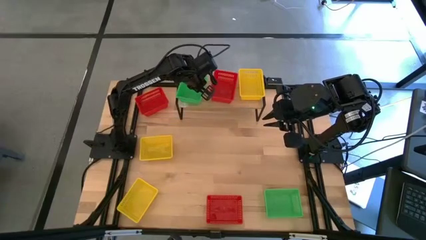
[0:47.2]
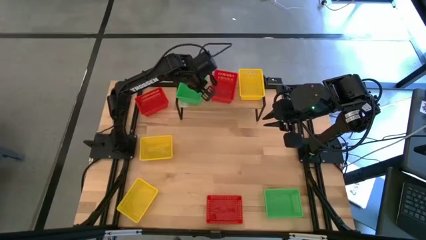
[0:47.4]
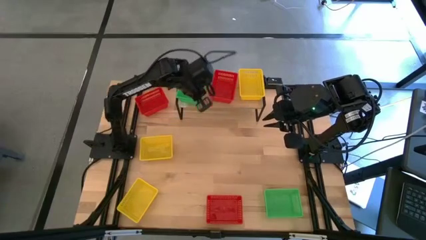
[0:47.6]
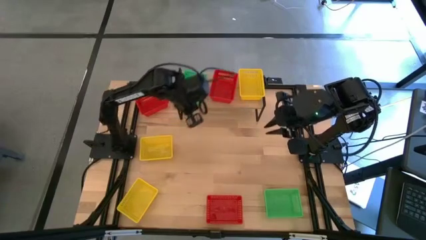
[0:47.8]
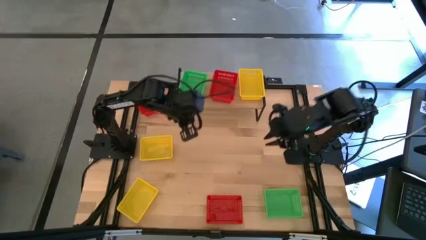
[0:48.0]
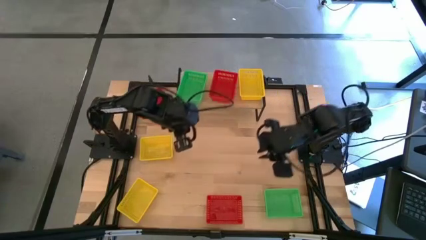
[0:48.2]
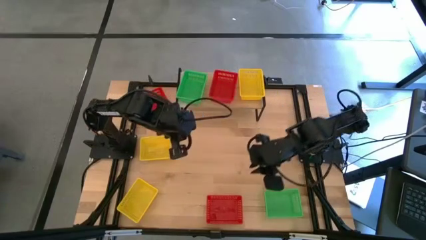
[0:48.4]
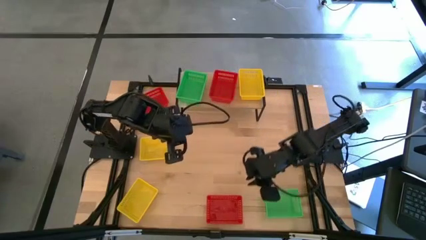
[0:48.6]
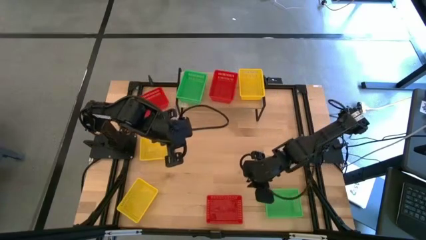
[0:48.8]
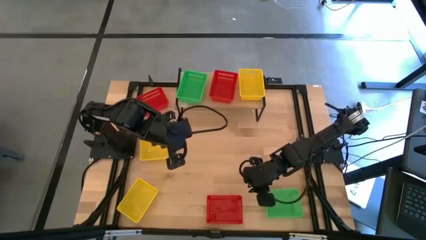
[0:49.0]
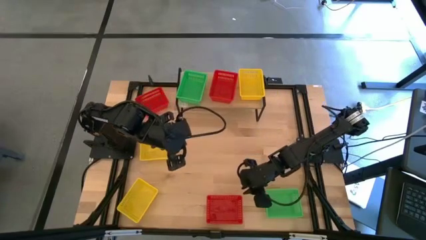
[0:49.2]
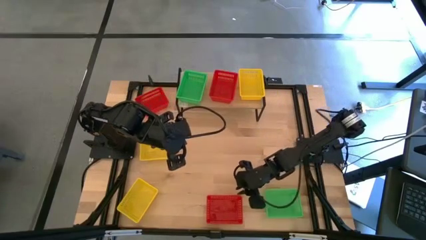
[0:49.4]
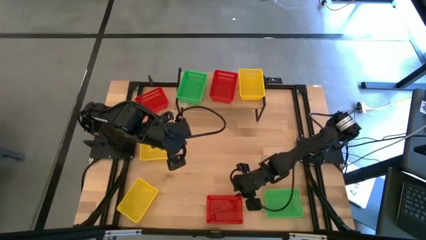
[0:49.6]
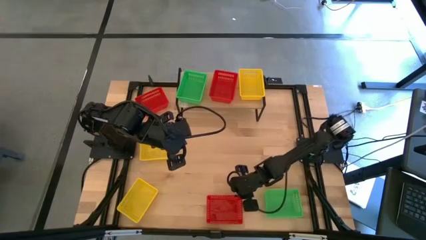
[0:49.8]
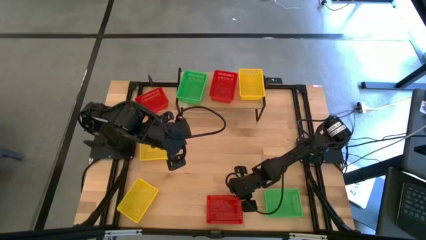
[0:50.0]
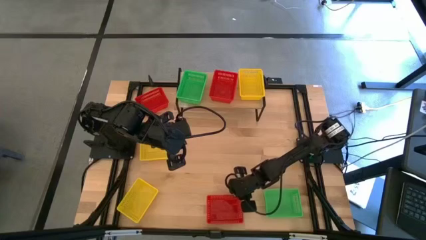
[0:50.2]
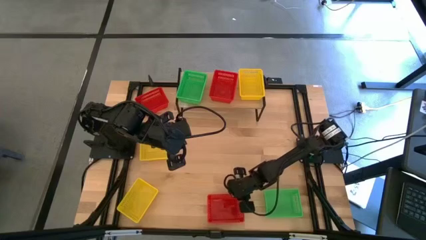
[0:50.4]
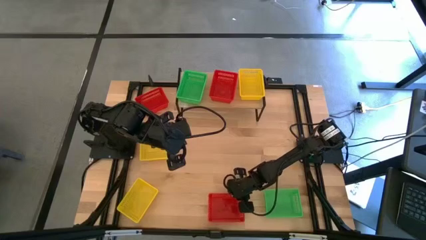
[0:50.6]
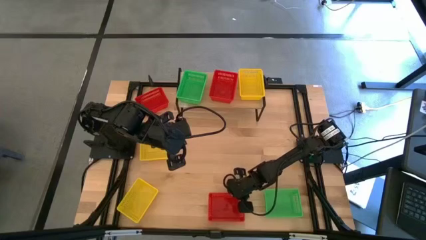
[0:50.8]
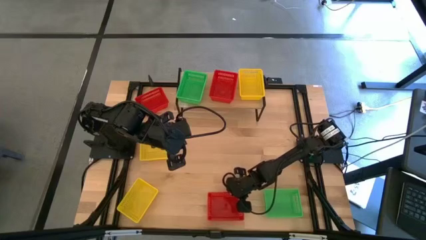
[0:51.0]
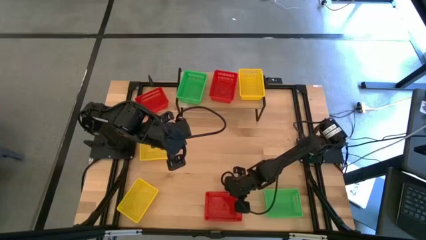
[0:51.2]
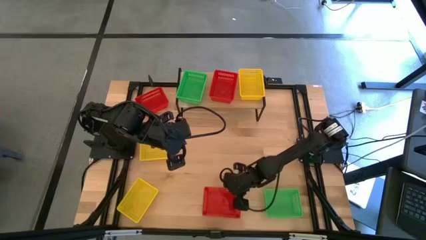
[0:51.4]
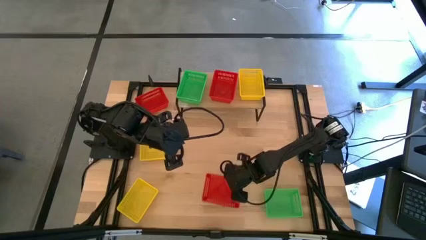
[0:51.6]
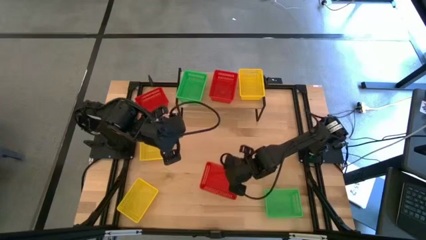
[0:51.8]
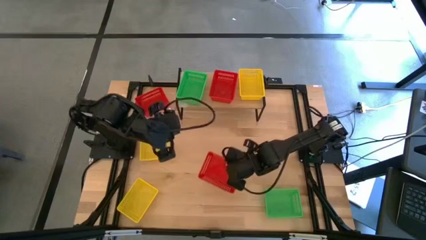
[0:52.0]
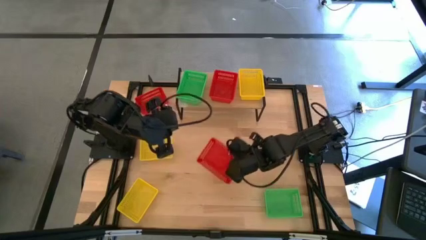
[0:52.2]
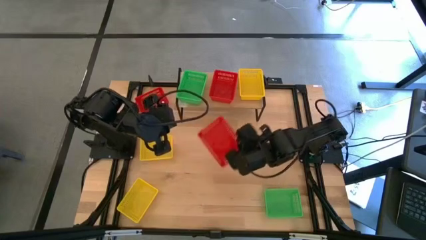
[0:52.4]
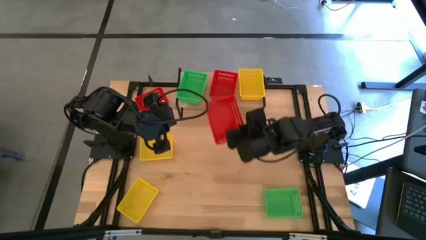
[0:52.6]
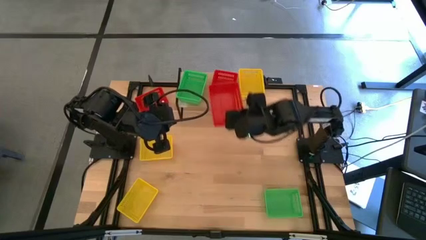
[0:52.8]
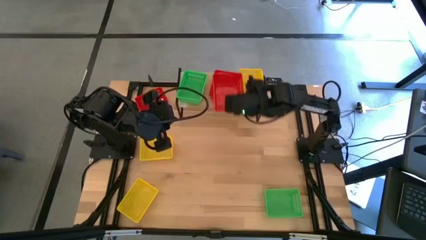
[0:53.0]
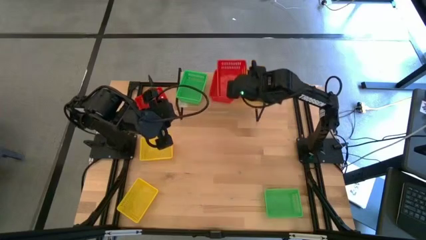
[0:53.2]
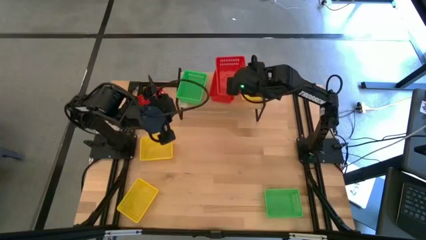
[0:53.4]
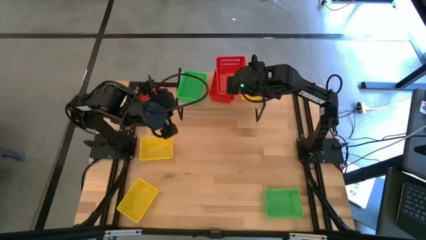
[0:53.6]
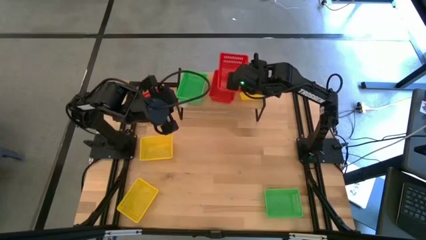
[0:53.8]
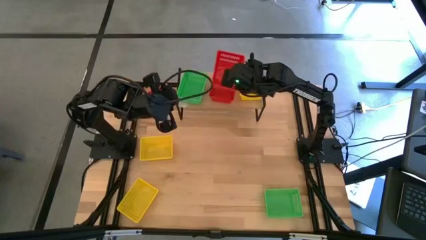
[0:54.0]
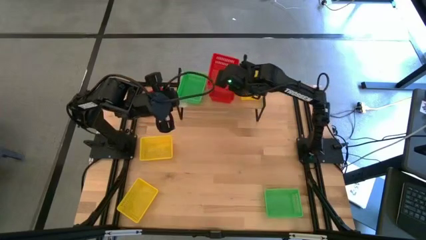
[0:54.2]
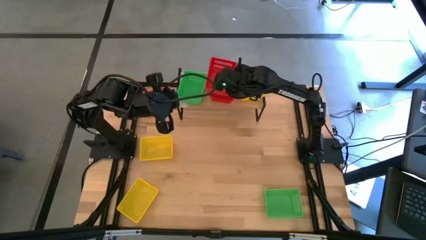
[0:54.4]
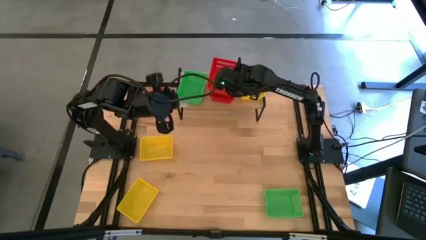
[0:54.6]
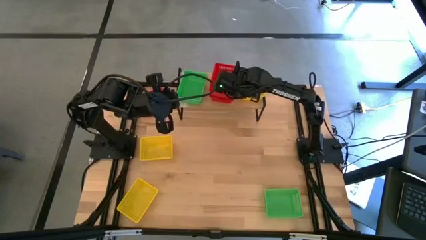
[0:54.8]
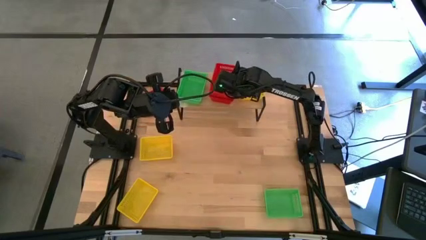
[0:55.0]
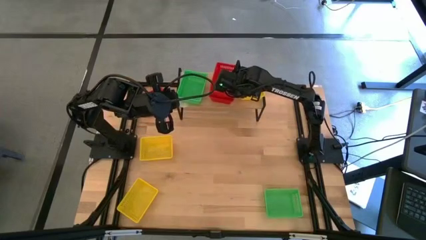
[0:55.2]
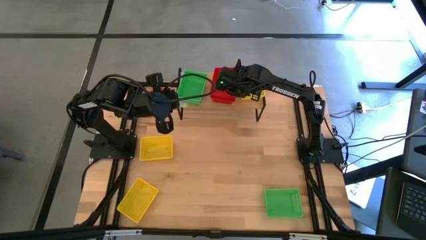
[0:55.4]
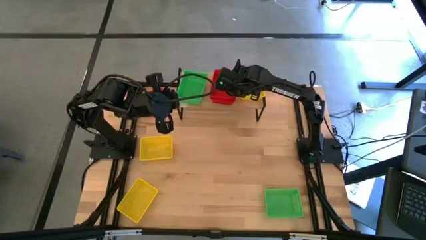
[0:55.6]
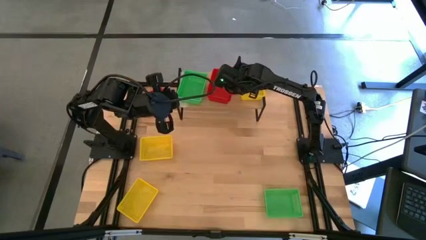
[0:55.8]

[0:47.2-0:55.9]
Task: Stack baskets on shelf by color
Stack the bottom red bin on top of the red bin on the shelf

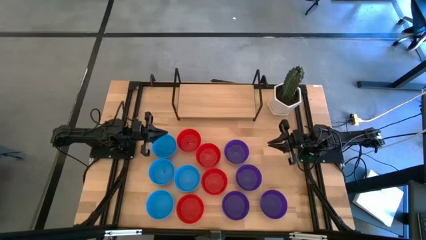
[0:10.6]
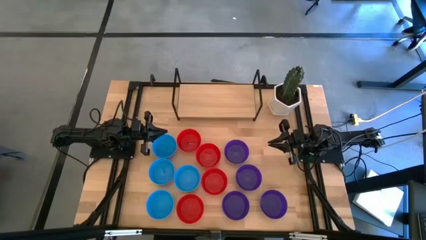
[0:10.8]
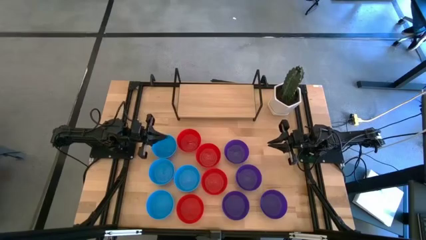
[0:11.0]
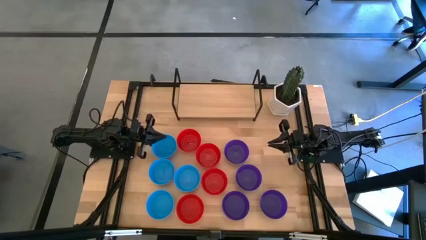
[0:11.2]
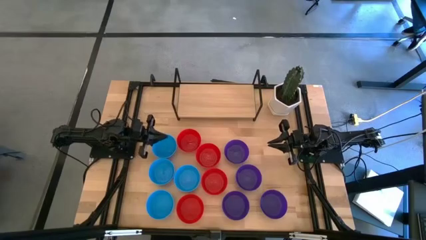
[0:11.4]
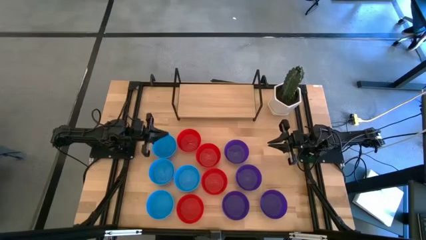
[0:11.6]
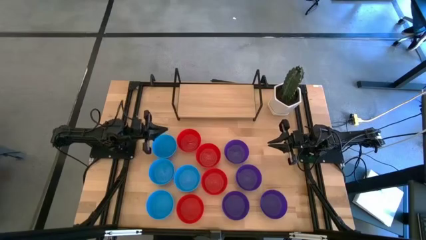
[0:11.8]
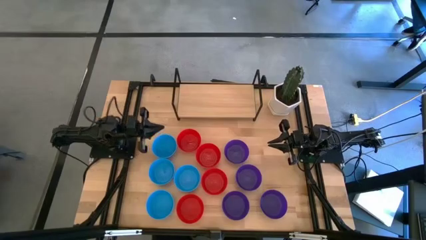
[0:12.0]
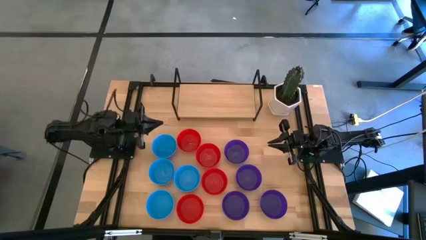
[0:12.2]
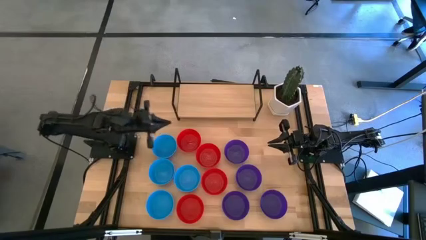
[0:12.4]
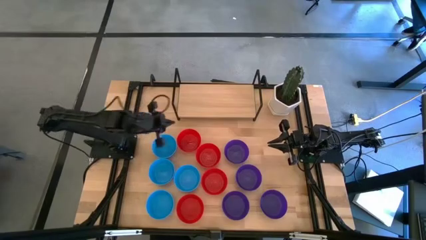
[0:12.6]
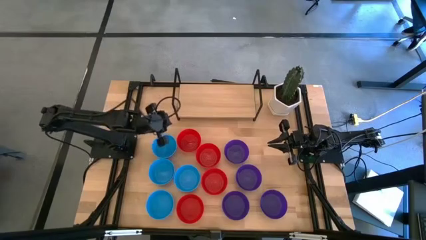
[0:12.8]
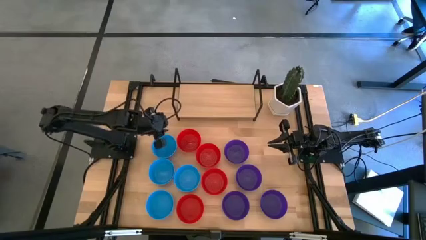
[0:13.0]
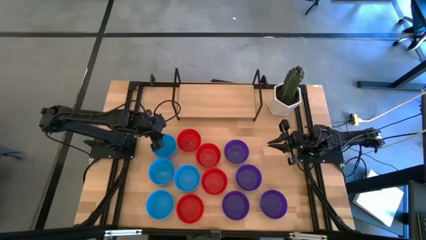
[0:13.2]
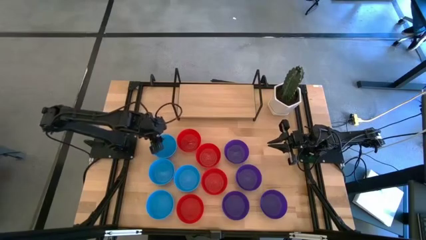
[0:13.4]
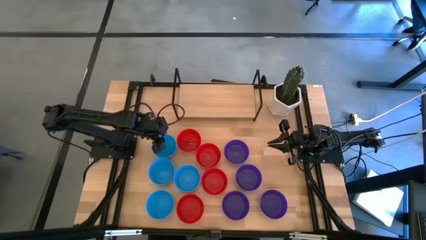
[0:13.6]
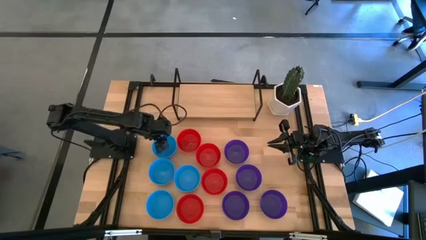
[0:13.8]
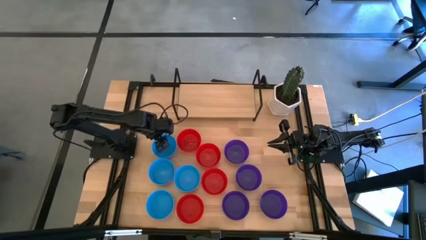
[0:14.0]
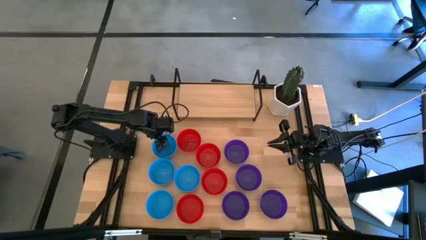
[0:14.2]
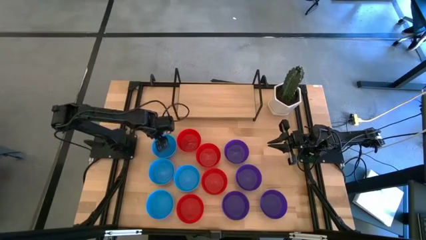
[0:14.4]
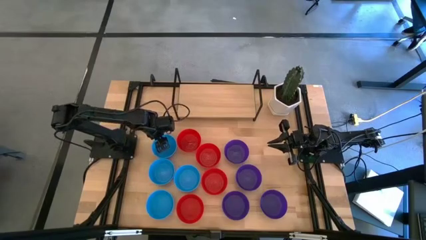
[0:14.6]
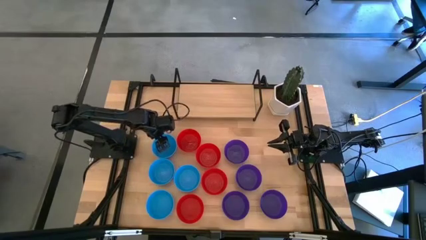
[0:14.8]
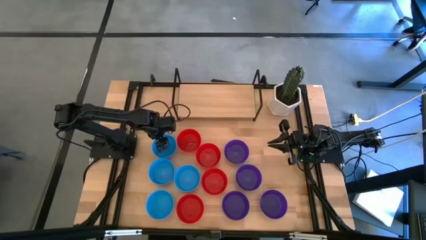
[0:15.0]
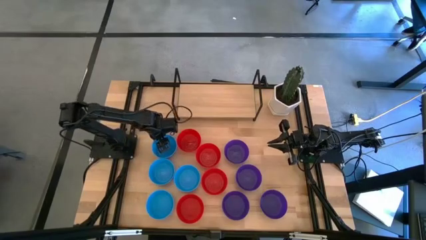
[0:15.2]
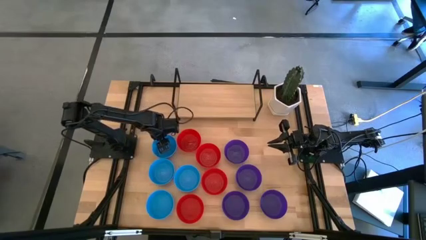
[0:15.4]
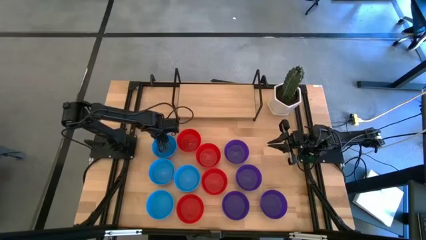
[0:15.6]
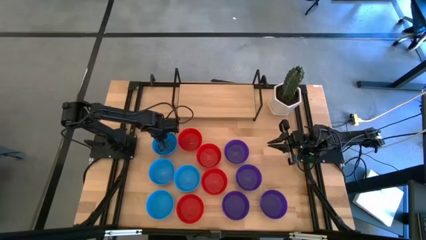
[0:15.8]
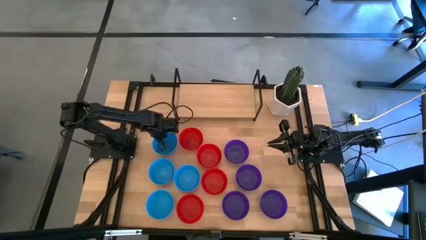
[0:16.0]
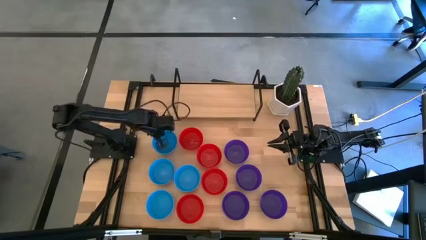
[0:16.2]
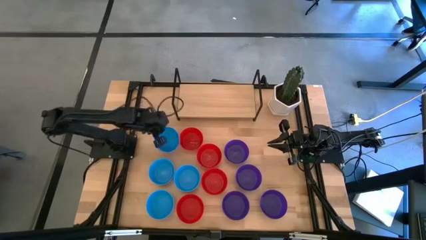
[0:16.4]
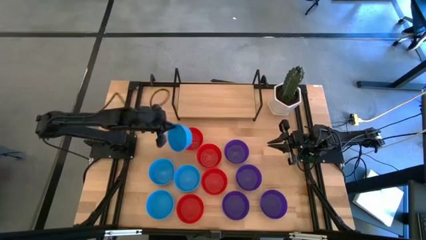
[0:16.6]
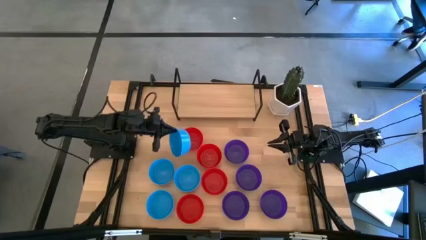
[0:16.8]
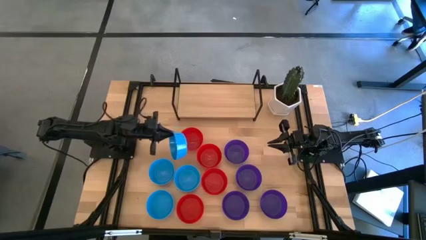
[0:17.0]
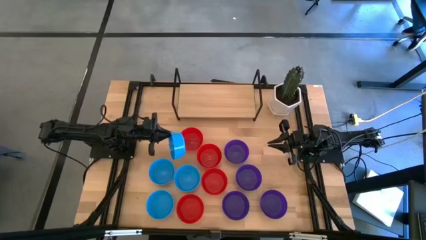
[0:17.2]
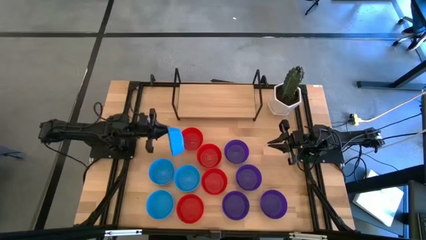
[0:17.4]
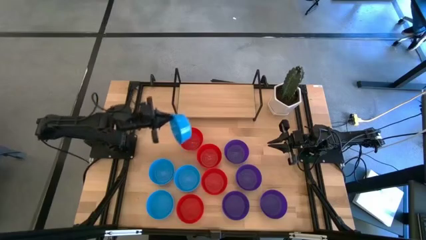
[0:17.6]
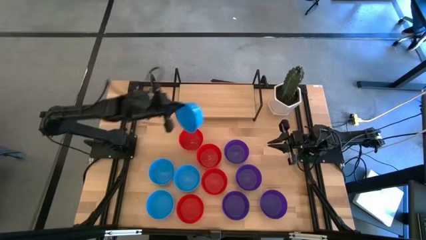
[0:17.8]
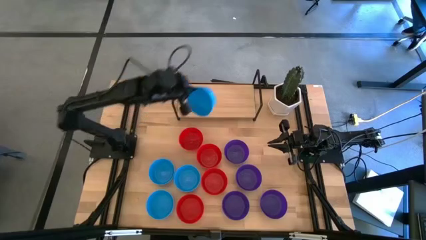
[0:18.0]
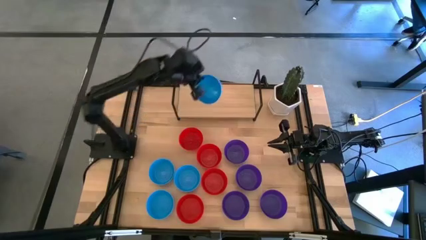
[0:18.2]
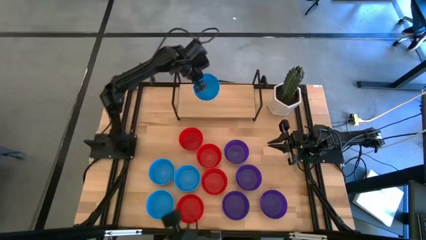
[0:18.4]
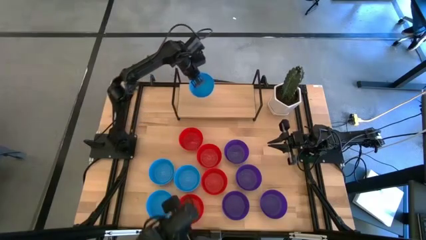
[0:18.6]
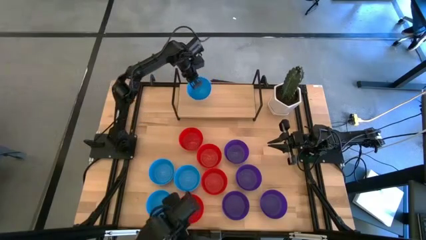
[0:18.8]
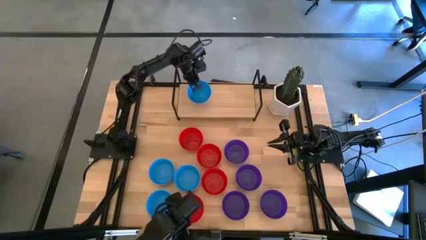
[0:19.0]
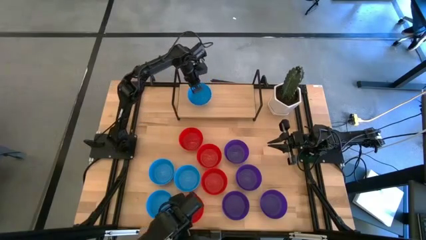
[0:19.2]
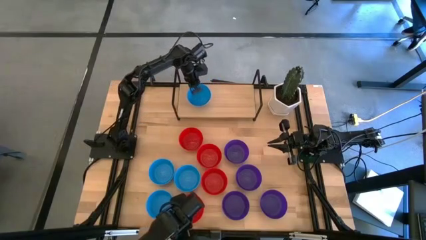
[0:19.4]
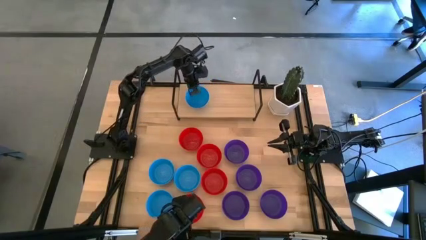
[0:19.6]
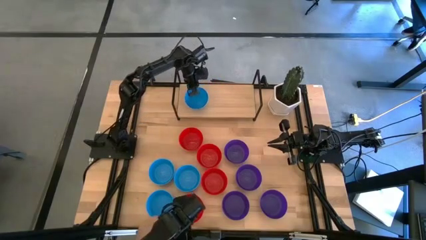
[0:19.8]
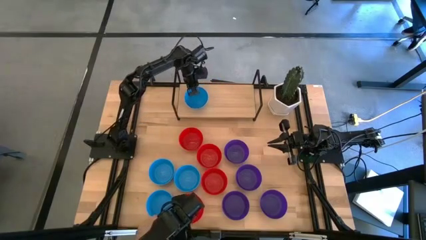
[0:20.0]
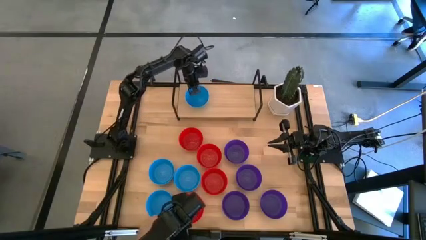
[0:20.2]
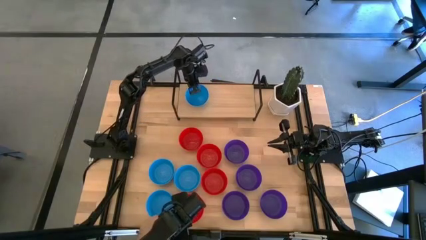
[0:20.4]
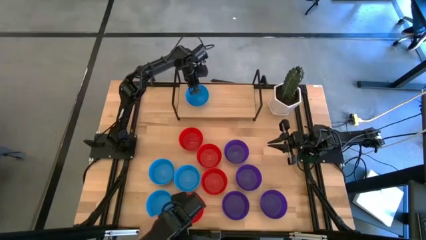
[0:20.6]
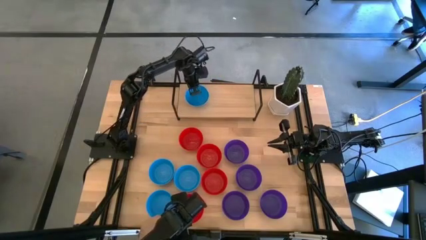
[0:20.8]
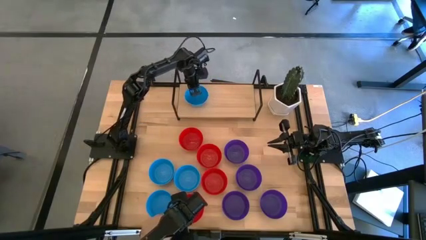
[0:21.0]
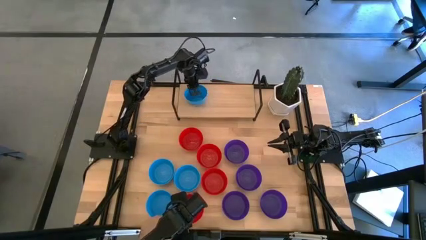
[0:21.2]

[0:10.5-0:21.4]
Task: Pick & Place Mini bowls
Put the blue bowl on the shelf
